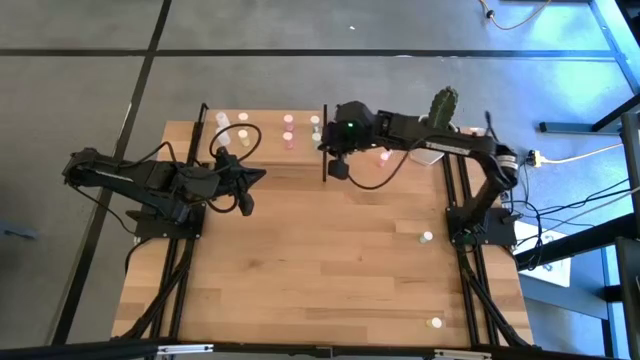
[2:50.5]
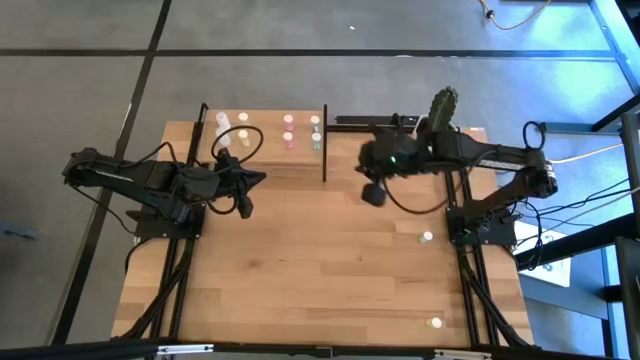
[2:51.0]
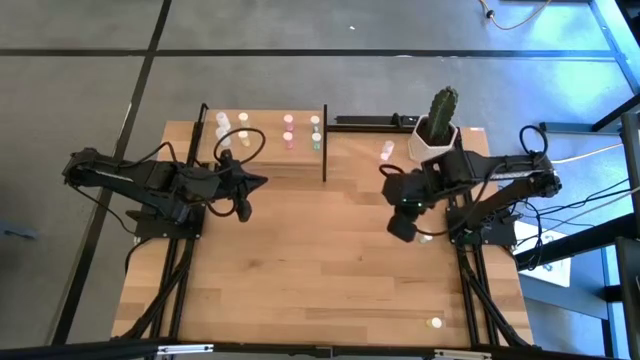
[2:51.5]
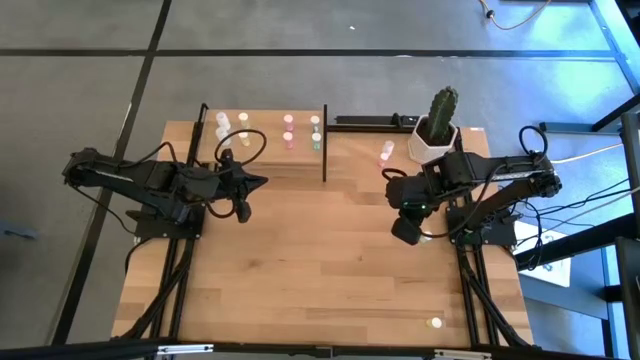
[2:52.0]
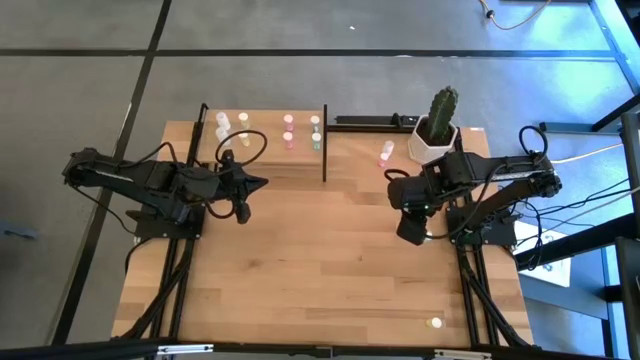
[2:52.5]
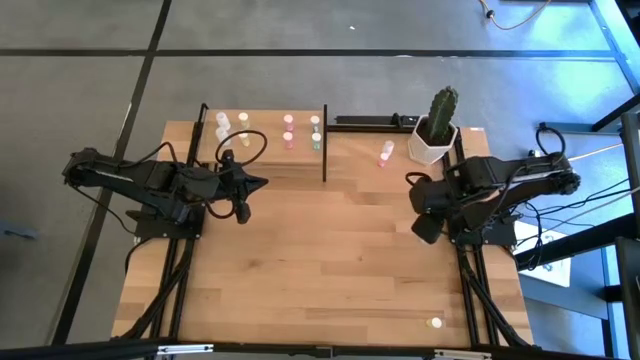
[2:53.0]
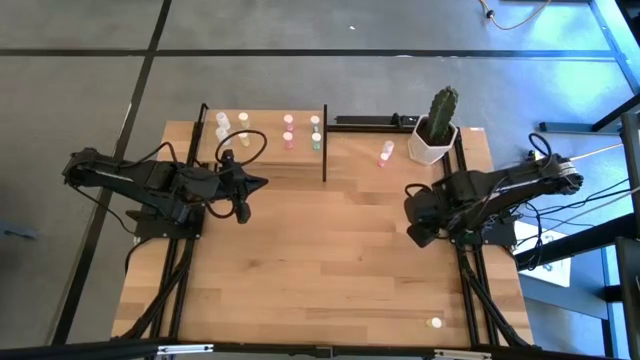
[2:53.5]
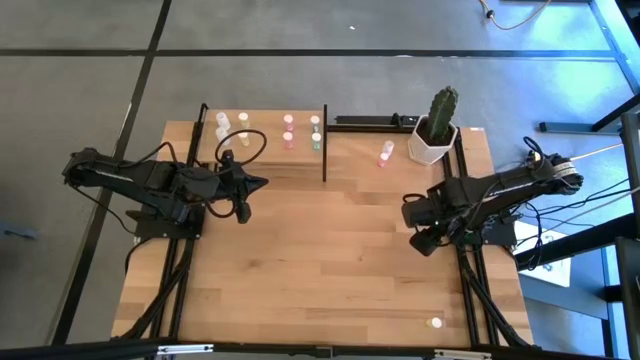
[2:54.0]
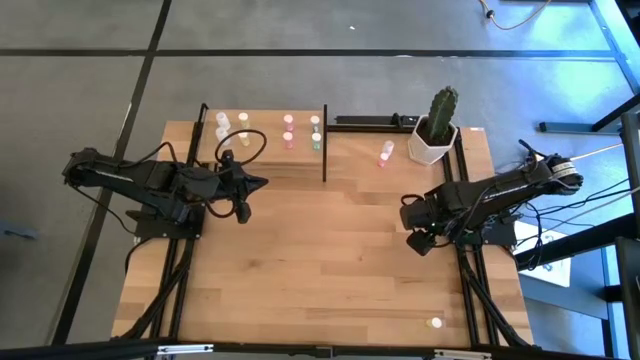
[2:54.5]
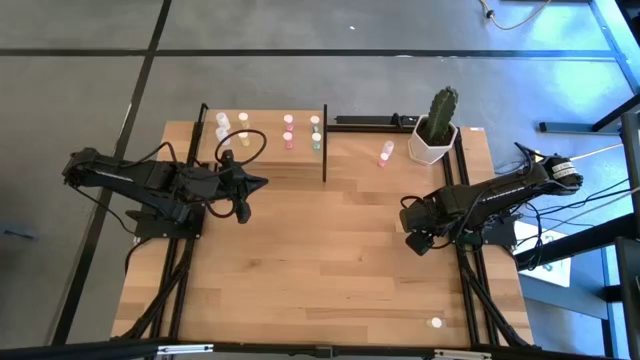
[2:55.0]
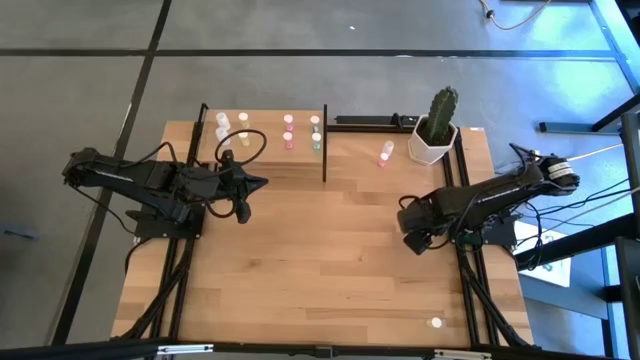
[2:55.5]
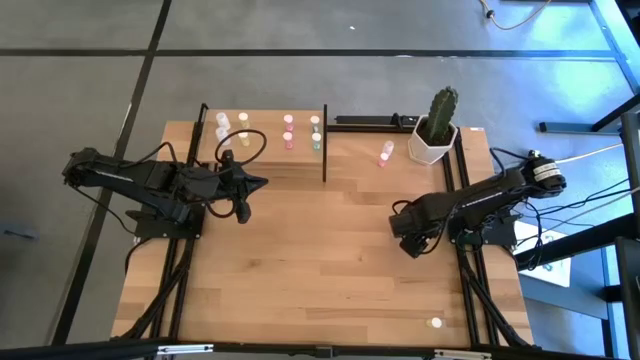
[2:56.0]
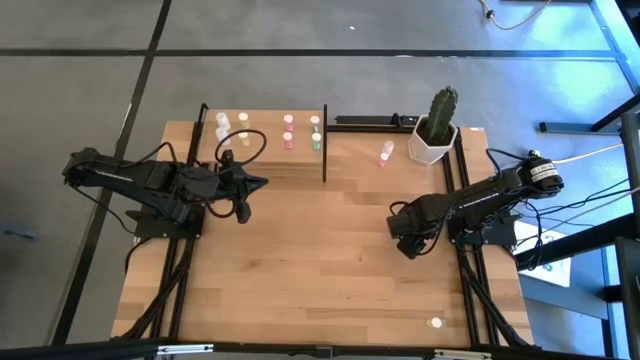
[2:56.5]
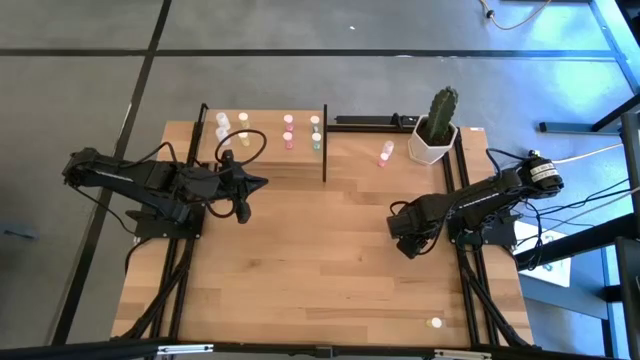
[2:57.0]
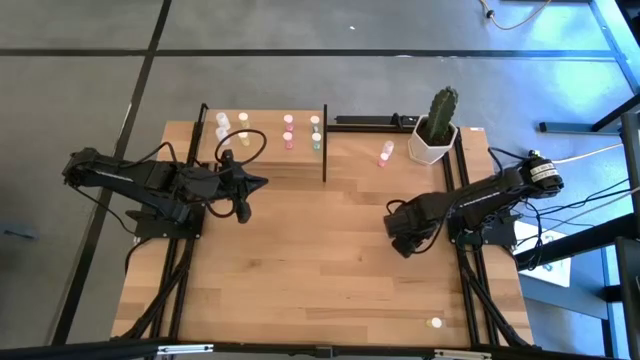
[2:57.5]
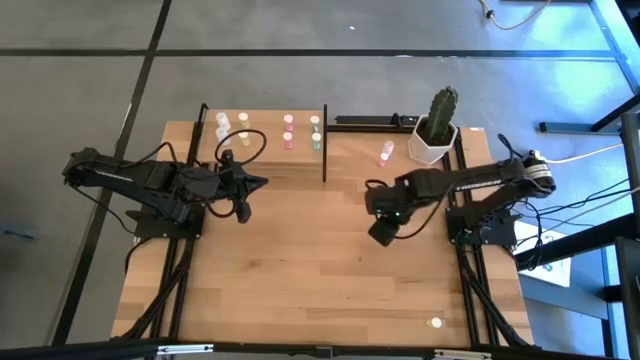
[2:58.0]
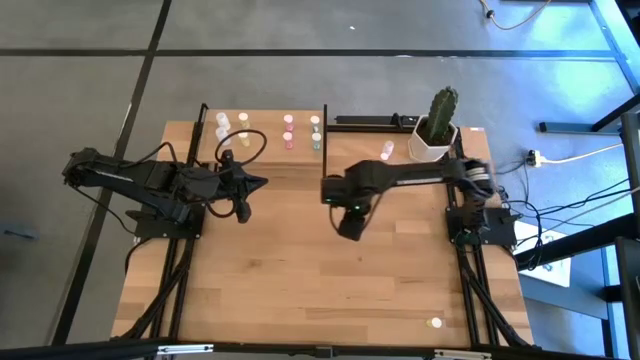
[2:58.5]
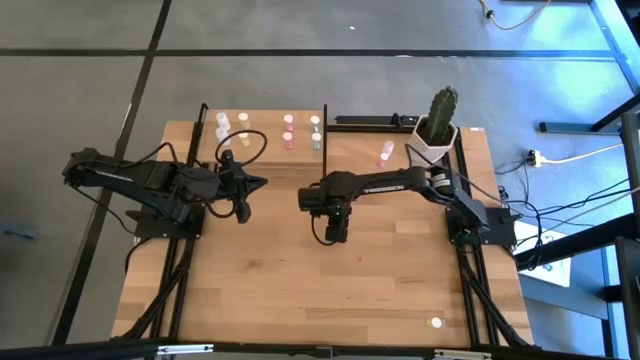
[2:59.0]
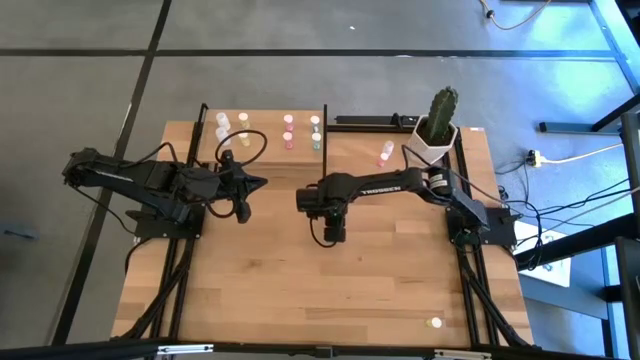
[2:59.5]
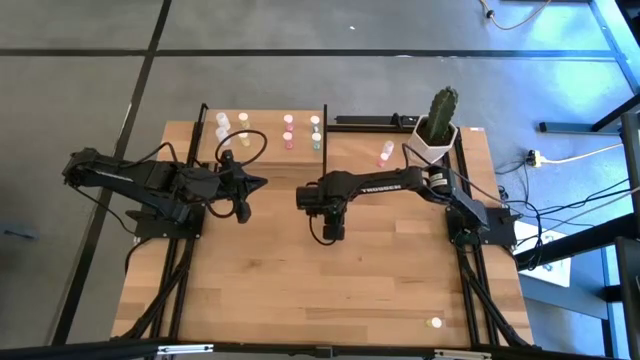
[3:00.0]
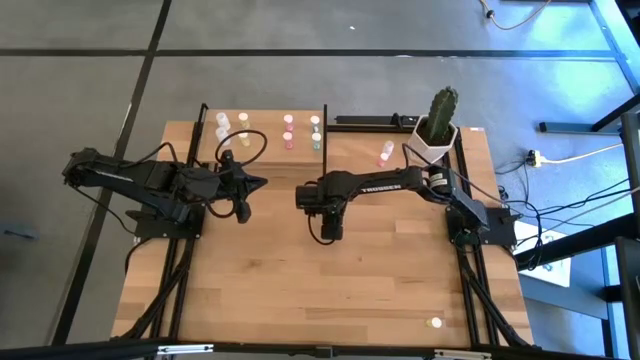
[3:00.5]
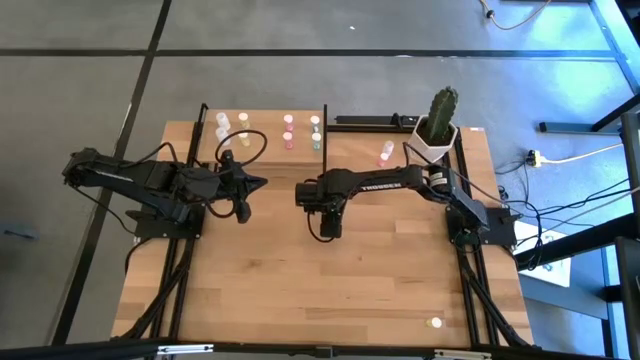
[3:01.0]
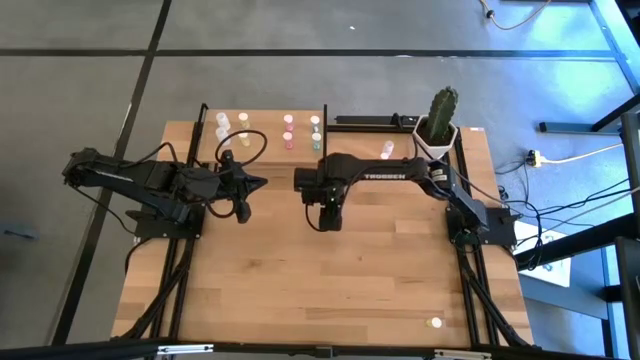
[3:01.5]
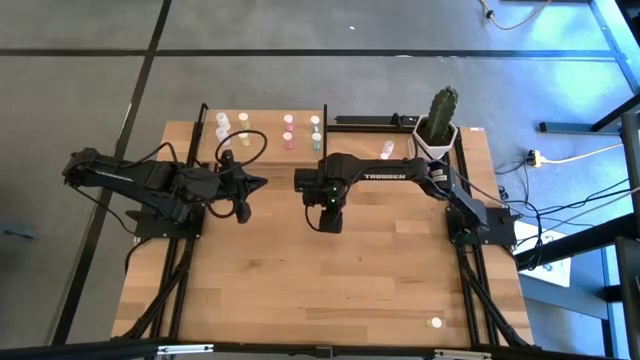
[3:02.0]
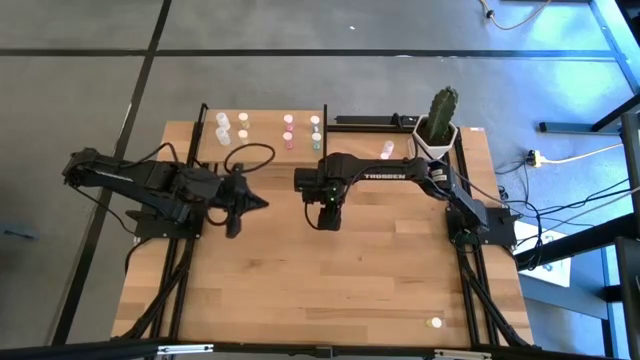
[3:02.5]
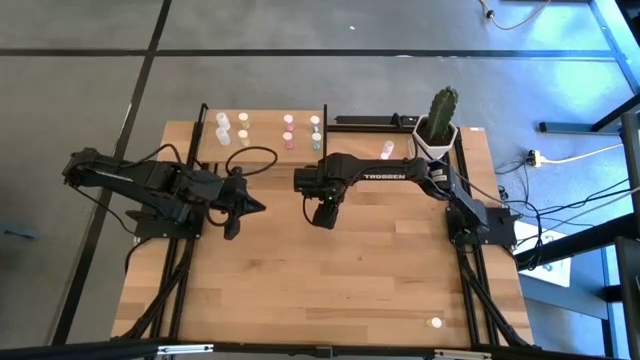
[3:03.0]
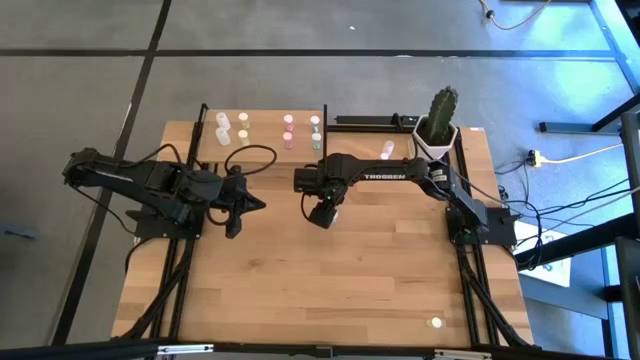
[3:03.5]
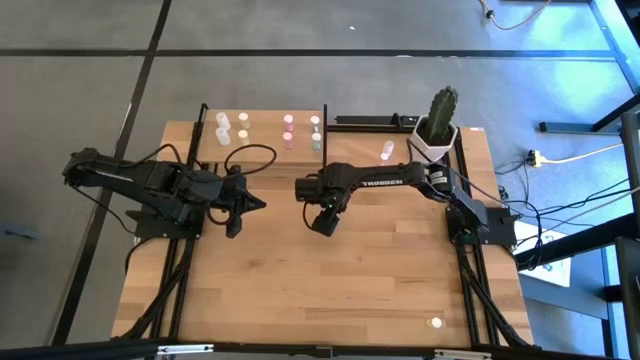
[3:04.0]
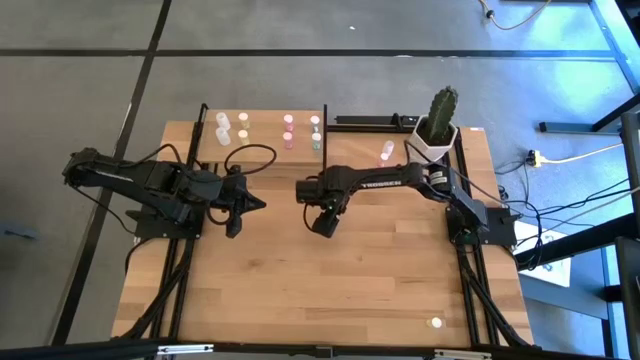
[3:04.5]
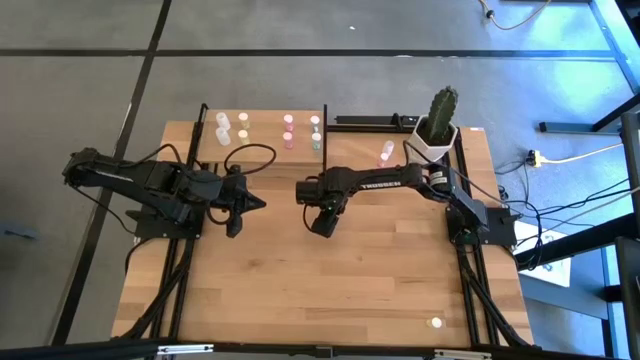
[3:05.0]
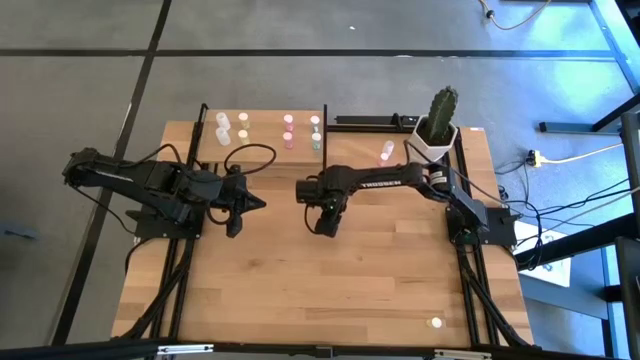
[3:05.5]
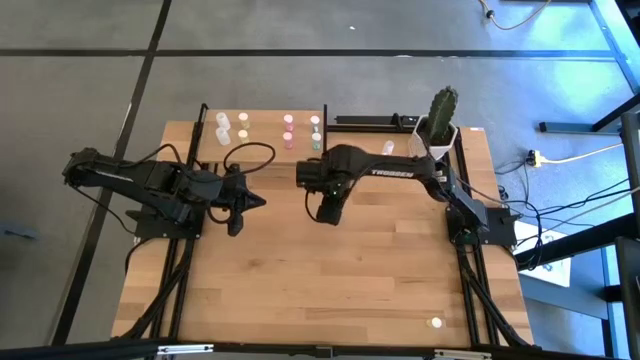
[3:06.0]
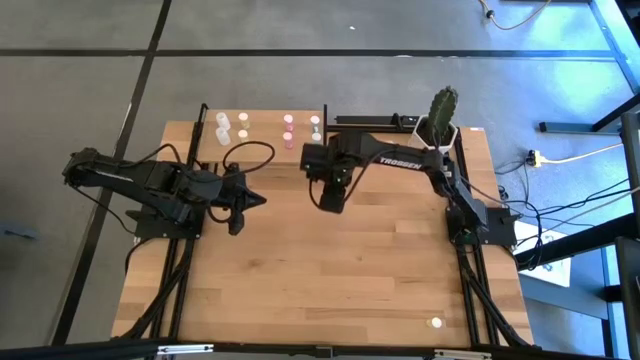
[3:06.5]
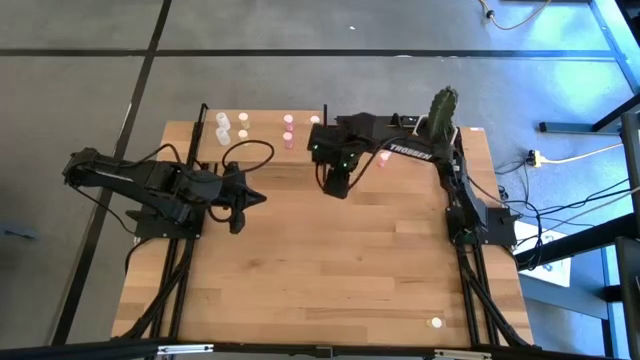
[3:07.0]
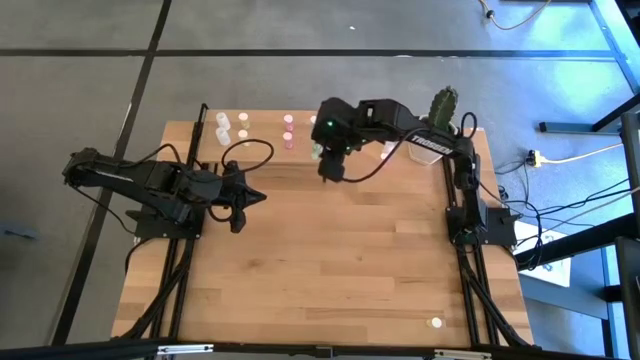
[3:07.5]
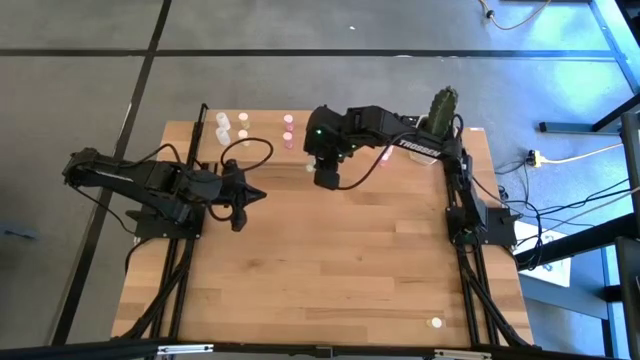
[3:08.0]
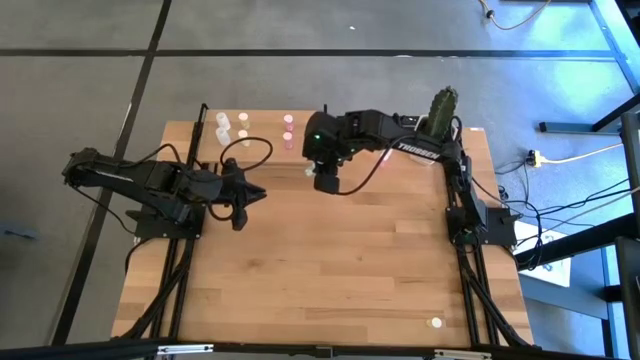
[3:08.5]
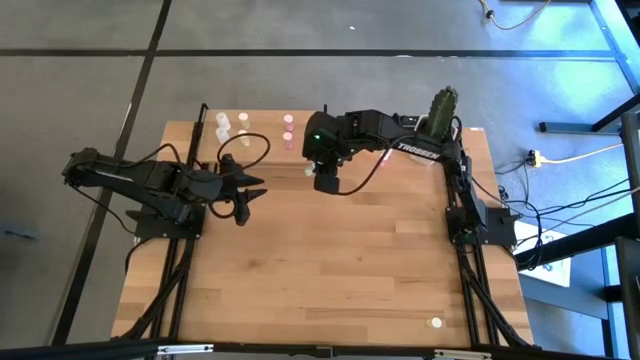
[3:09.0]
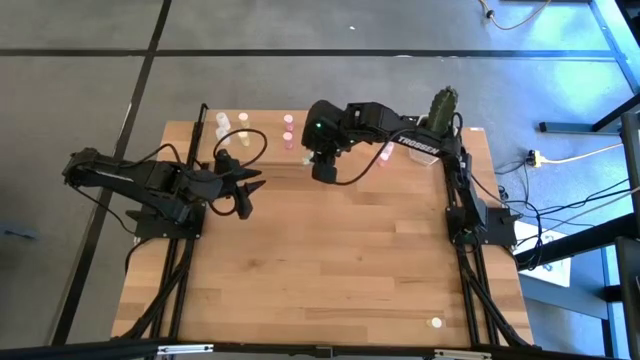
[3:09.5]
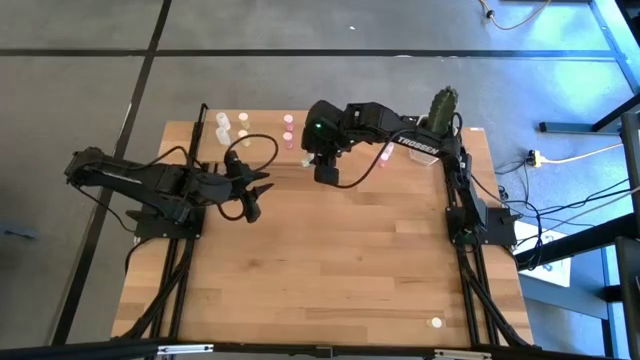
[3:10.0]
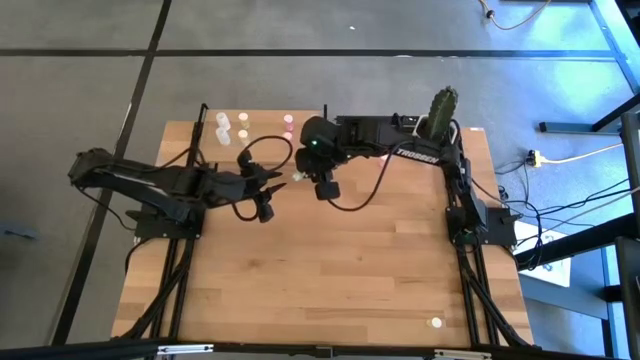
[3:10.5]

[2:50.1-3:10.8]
Task: Pick and place medicine bottles onto shelf by color
Put the green pill bottle on the shelf and align it with the other green pill bottles

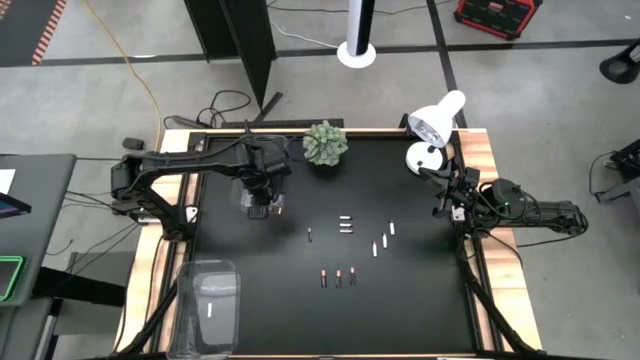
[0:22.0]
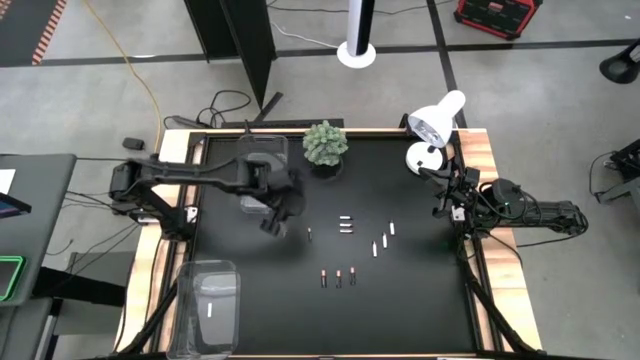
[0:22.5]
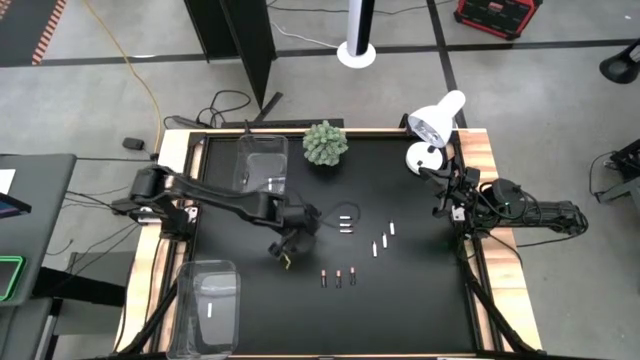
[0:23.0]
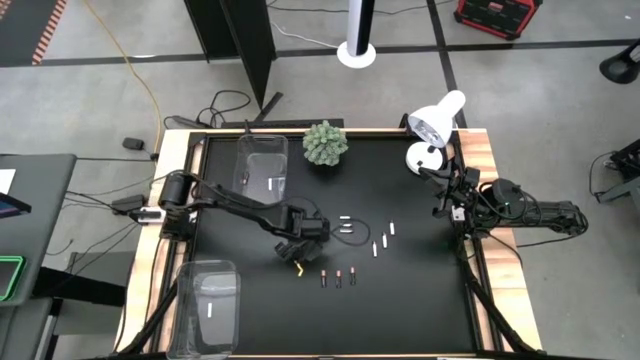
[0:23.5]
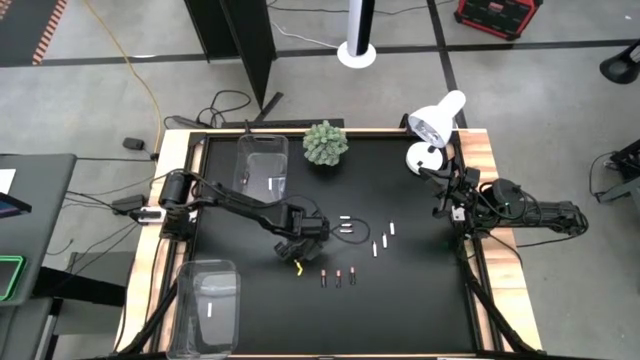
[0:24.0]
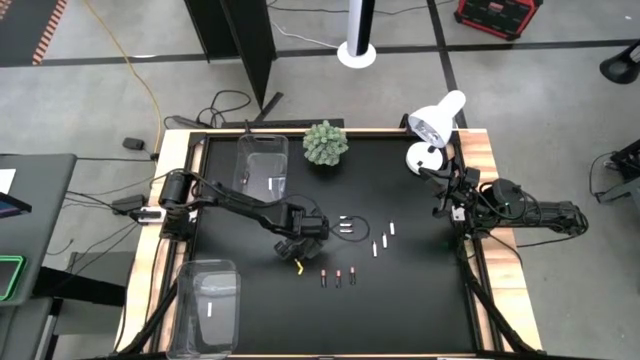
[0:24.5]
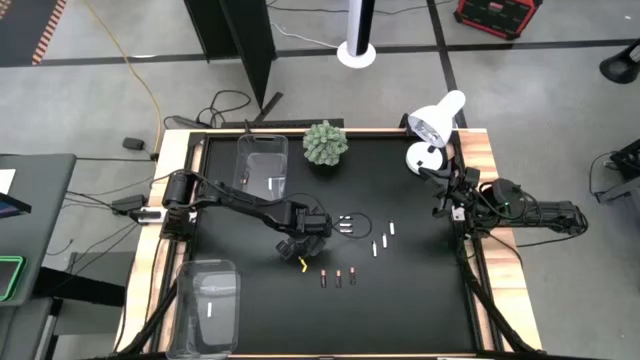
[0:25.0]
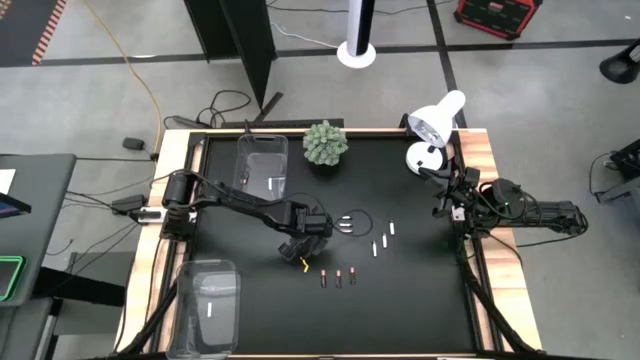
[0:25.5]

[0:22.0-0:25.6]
Task: Sort batteries
Put the top black battery into the top transparent bin
